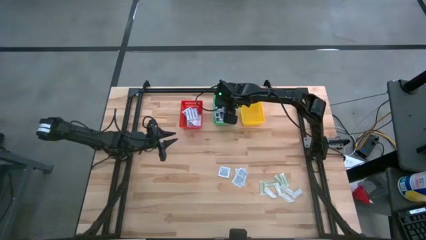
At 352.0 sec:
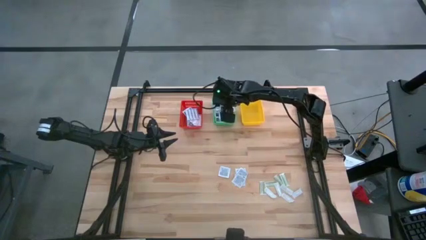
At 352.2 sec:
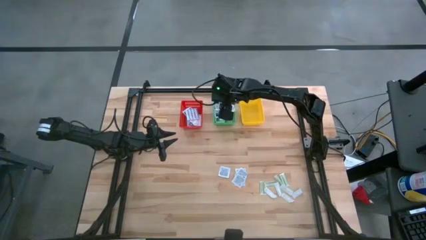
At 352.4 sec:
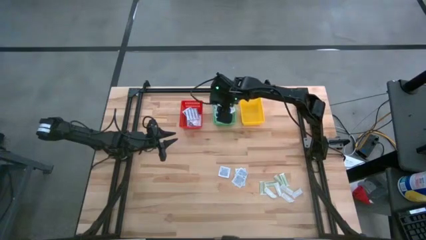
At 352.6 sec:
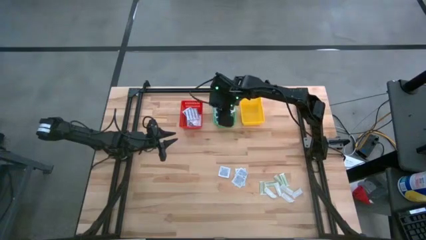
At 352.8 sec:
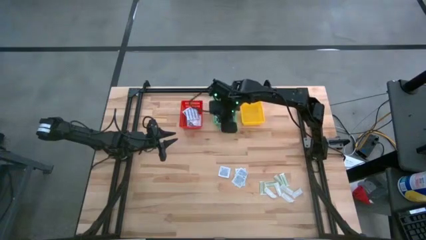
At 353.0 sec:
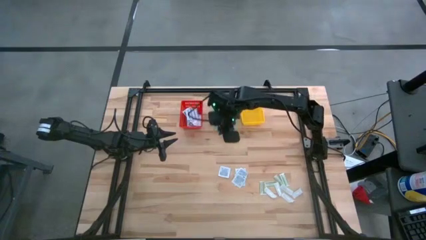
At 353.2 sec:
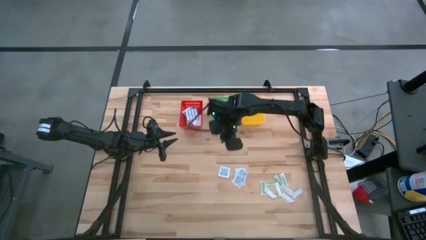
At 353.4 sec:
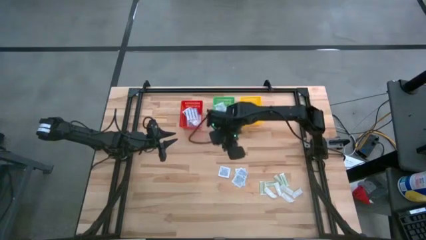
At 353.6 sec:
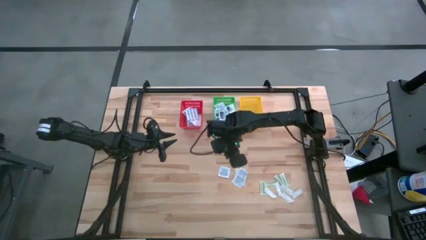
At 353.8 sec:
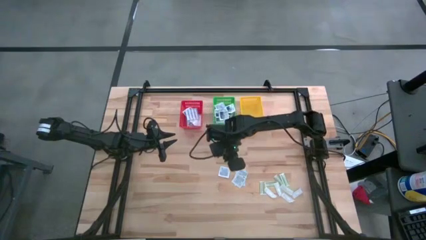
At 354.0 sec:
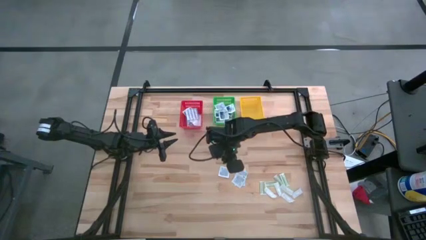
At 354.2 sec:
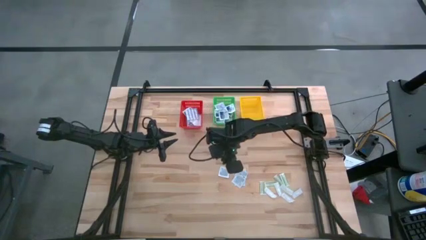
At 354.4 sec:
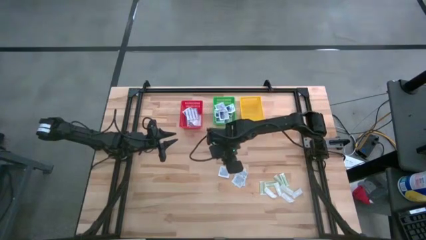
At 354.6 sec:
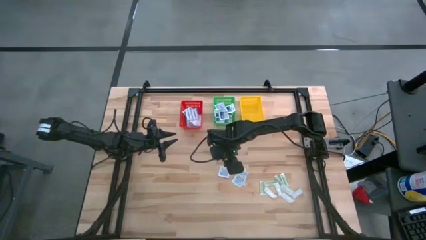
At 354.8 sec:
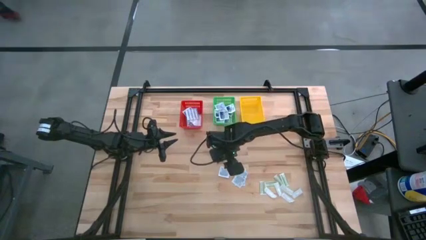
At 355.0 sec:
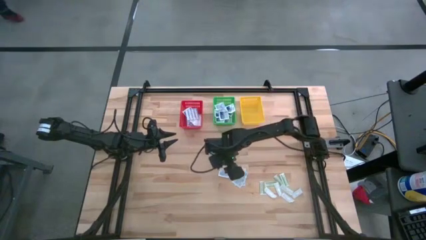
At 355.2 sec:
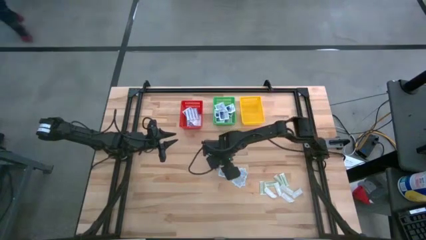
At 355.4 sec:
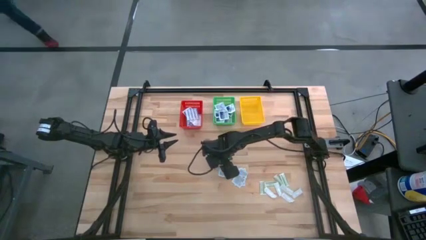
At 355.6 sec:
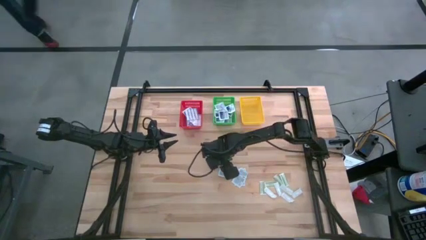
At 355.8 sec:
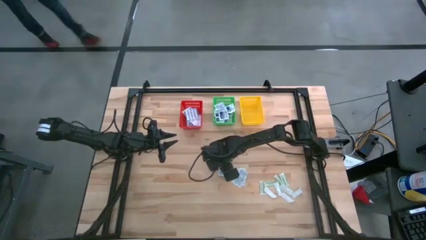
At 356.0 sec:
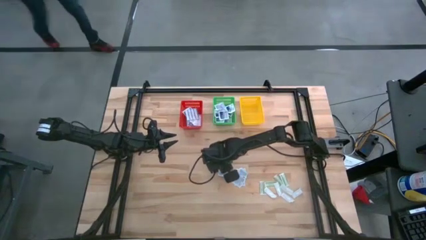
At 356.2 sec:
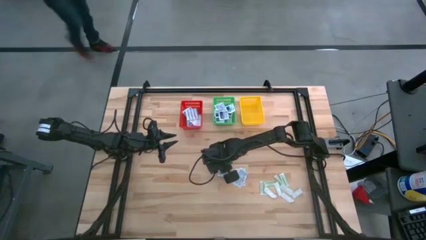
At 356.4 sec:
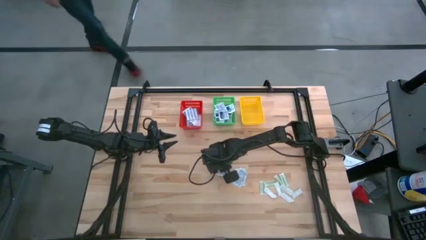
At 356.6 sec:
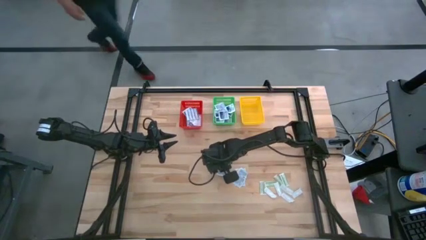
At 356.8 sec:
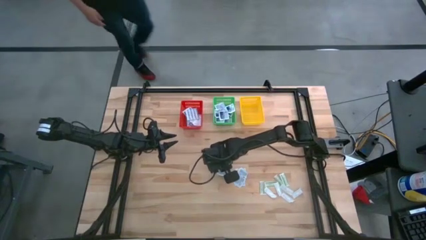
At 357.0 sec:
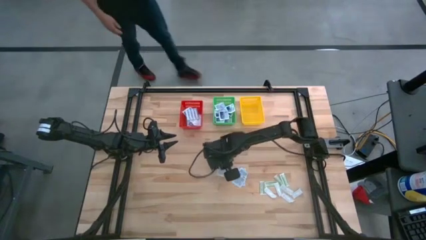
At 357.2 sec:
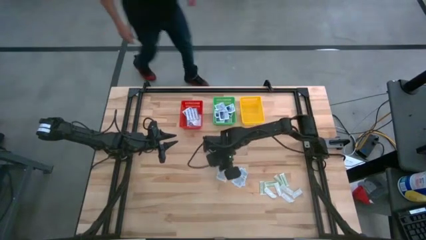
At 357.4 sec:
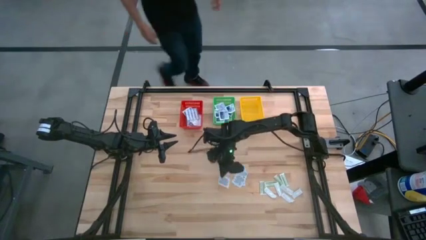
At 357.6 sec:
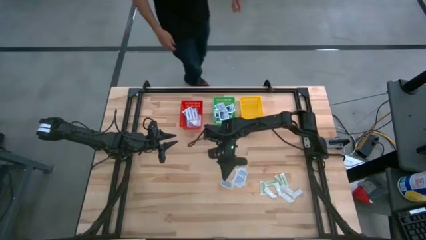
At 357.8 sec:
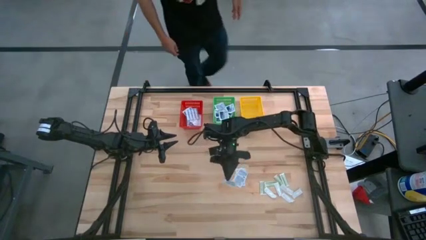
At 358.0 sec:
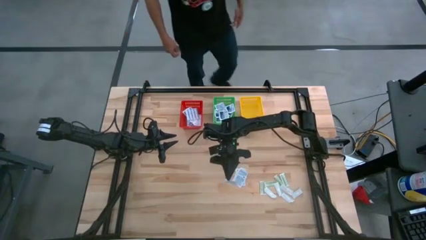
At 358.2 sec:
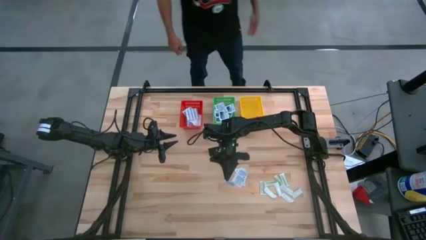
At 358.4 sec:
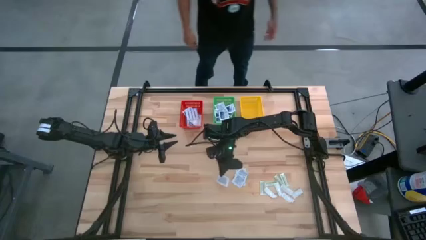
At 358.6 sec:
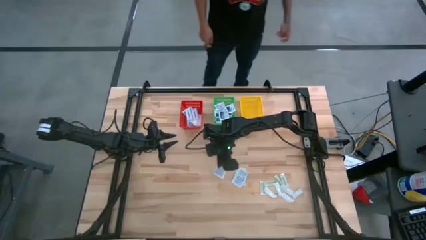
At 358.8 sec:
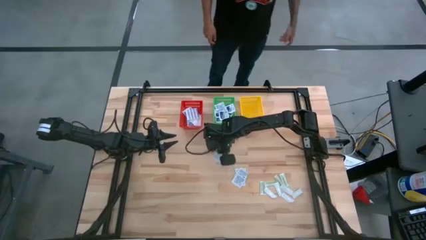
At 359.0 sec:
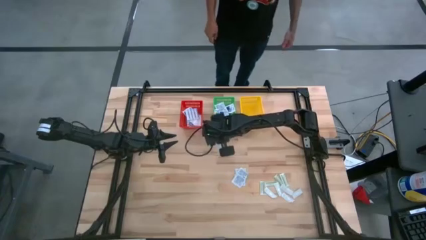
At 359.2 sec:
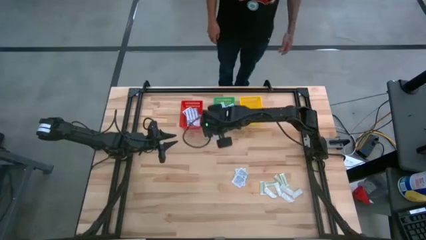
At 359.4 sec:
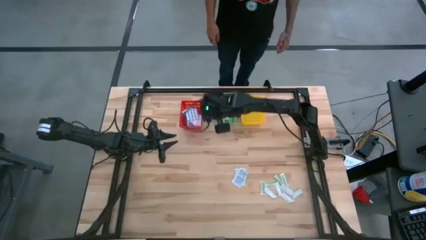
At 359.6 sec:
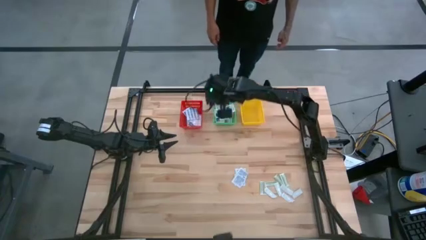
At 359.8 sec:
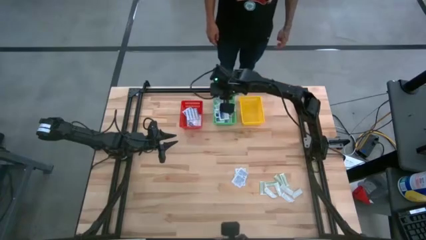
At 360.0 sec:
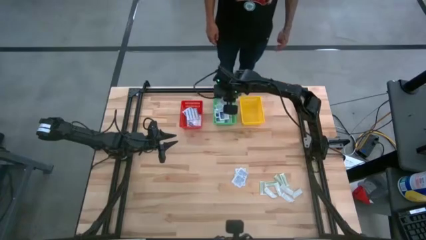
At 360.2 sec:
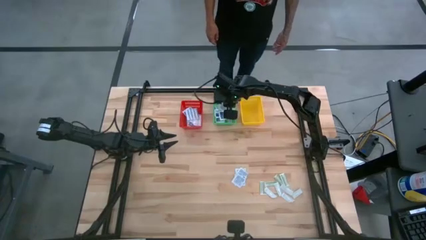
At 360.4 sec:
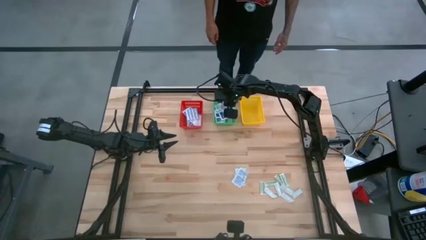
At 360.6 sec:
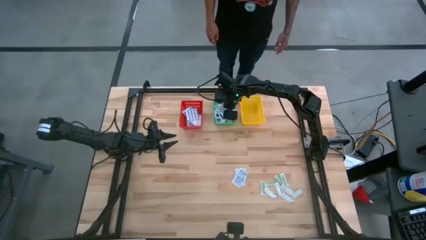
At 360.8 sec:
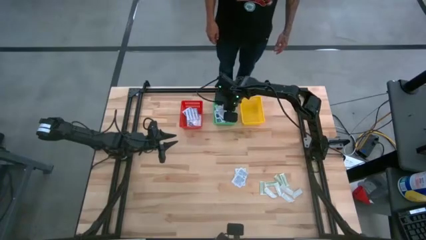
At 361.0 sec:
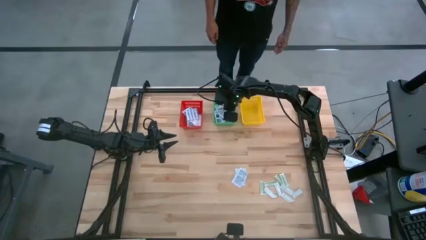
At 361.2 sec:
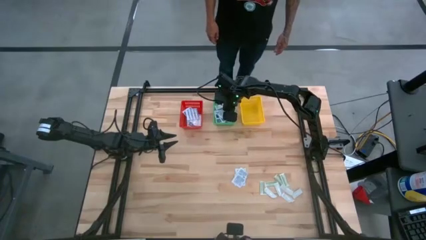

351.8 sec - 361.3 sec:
Task: Pick & Place First Aid Supplies
Put the alcohol pad into the green basket

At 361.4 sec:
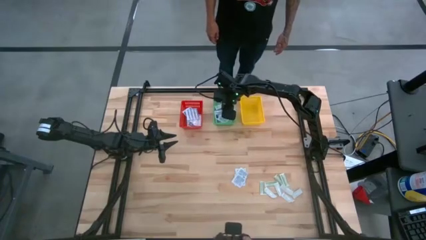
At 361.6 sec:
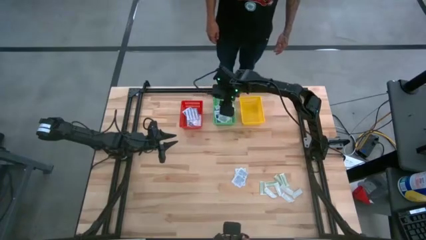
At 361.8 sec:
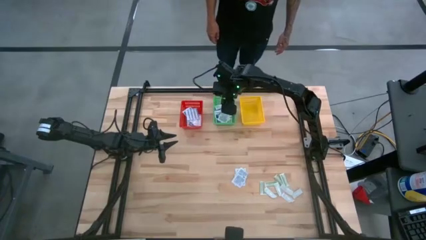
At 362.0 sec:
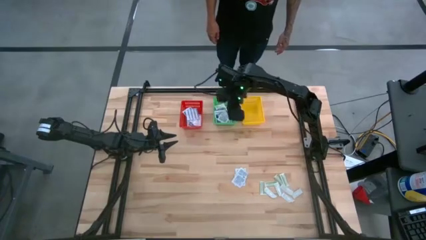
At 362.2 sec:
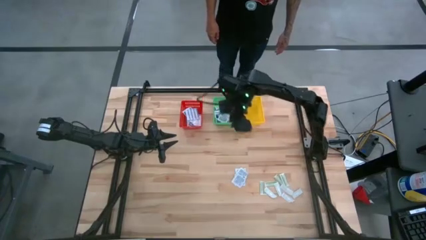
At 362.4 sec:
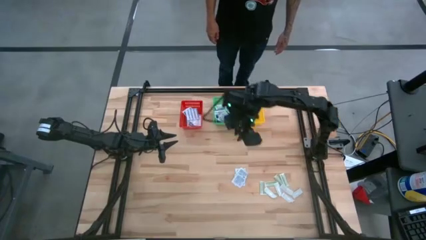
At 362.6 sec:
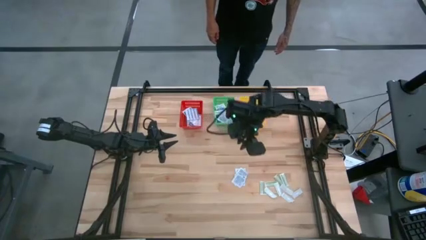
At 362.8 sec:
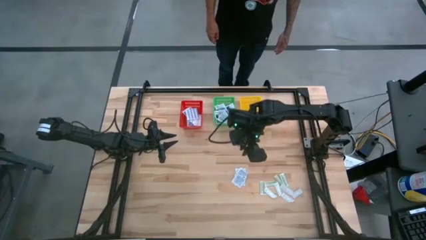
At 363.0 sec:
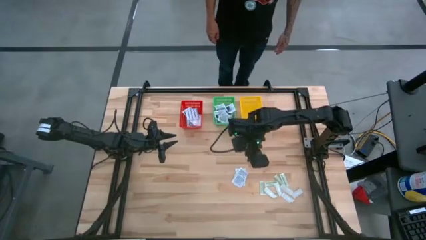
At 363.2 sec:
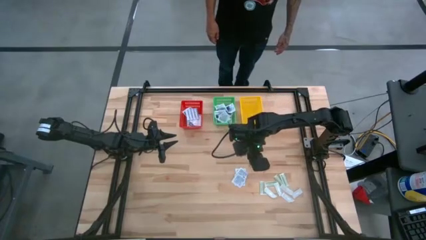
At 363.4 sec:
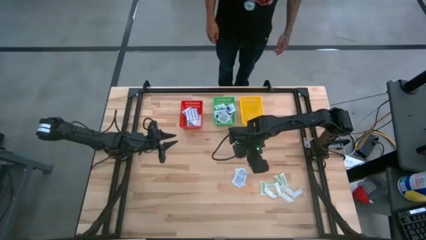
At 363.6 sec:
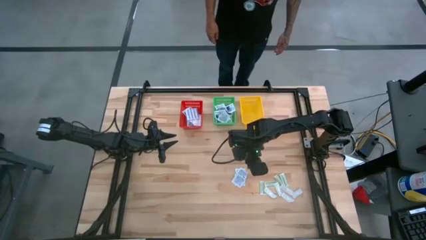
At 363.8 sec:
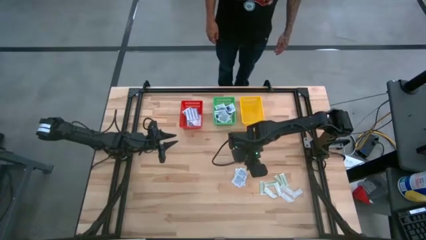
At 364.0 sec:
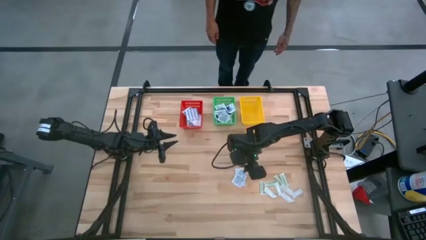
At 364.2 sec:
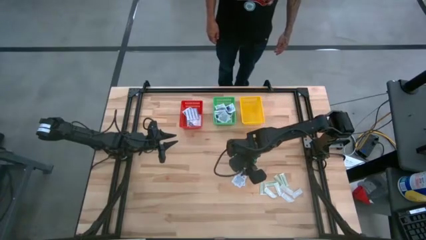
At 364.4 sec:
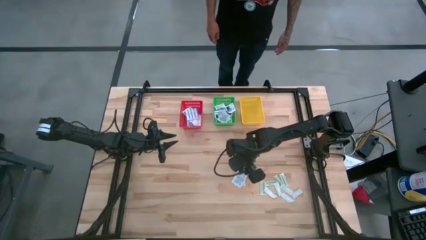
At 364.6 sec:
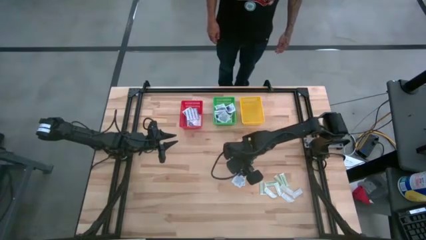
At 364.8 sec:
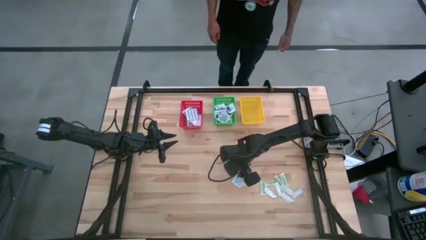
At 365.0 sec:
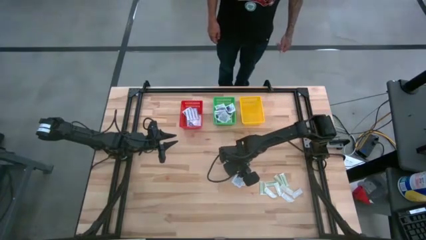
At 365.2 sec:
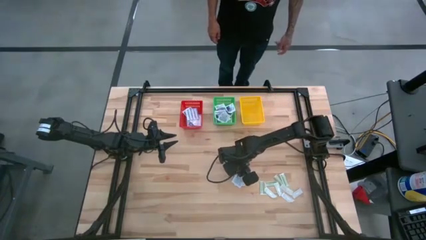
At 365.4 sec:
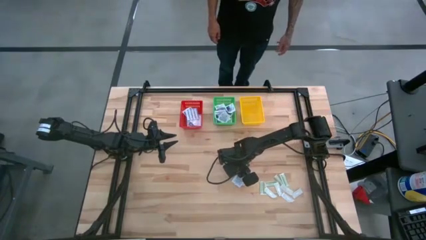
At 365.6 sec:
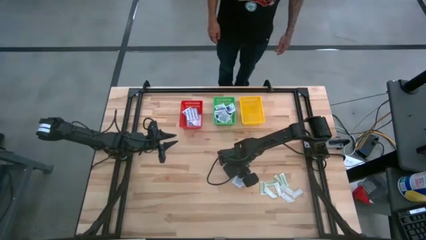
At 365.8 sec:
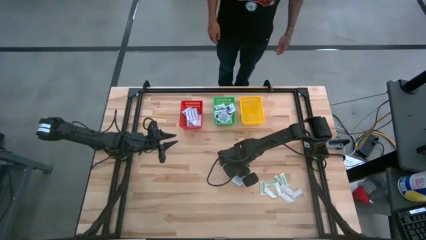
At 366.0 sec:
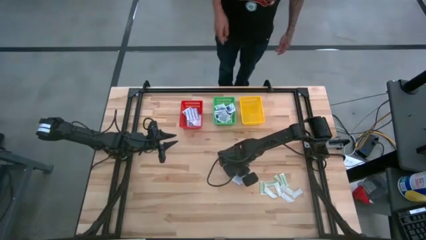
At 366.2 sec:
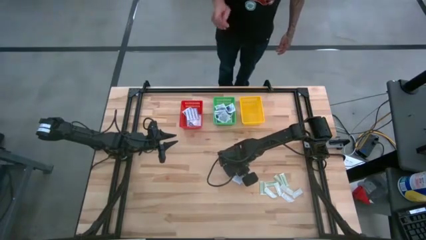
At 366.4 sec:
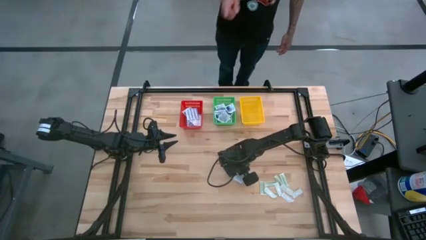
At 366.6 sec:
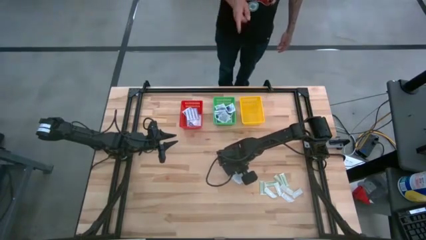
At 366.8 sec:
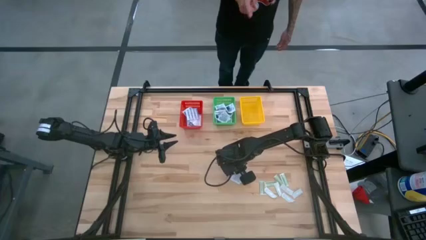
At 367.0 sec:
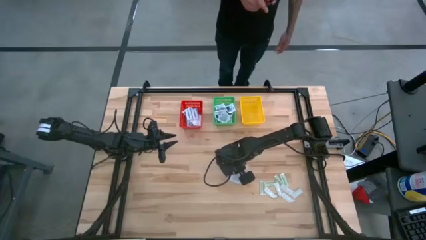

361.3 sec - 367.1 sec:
Put the alcohol pad into the green basket
